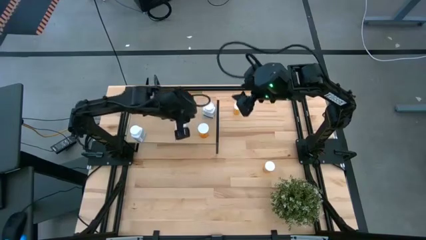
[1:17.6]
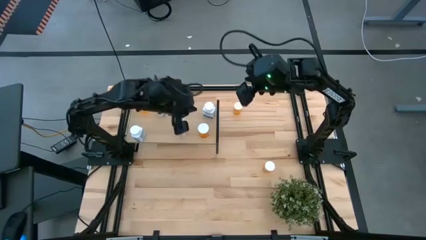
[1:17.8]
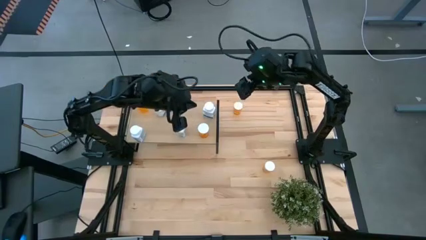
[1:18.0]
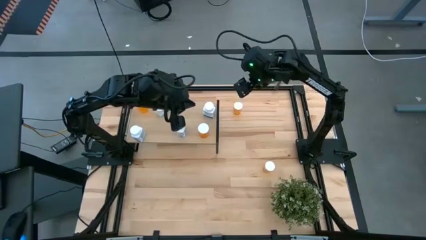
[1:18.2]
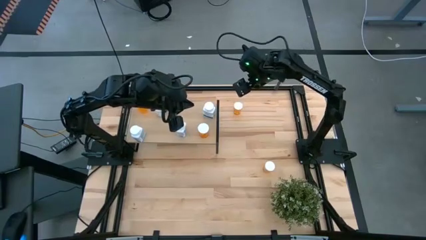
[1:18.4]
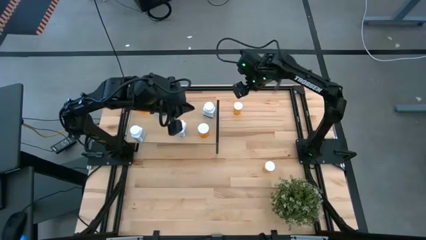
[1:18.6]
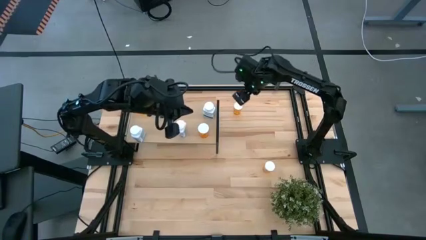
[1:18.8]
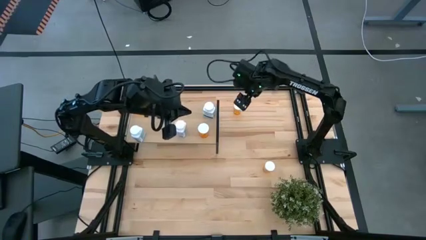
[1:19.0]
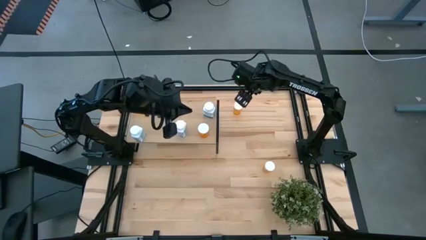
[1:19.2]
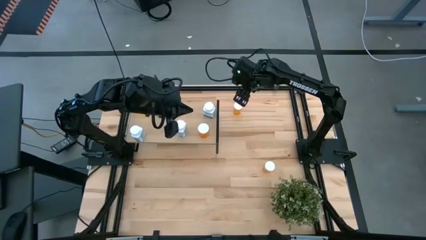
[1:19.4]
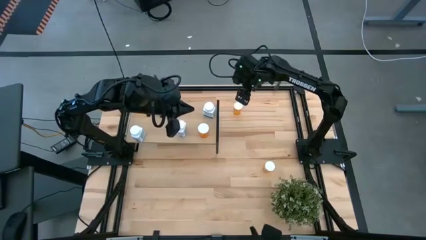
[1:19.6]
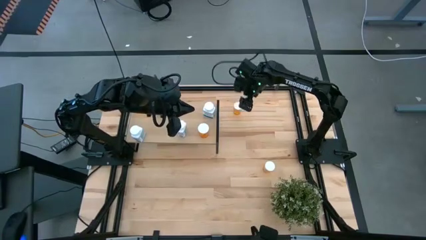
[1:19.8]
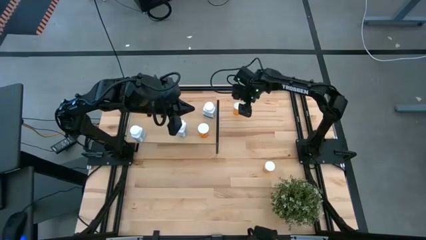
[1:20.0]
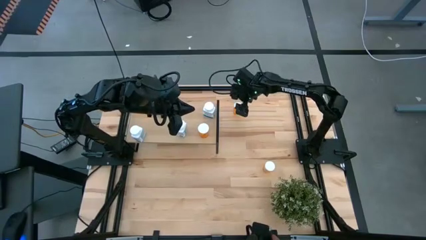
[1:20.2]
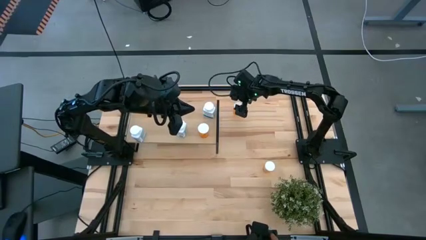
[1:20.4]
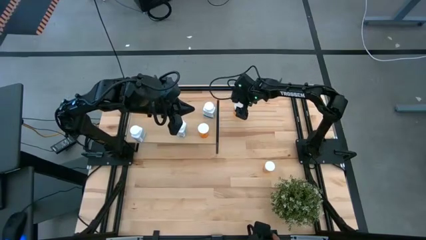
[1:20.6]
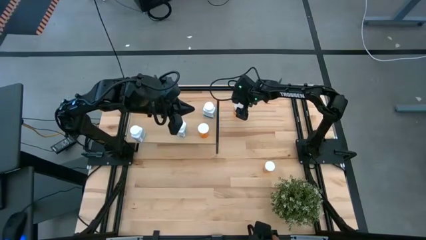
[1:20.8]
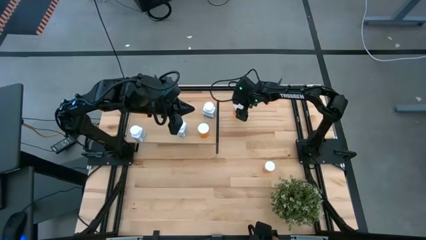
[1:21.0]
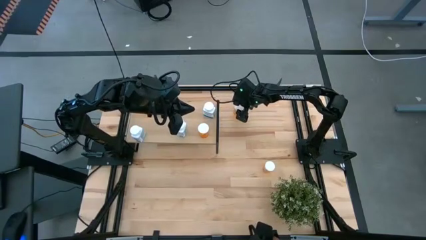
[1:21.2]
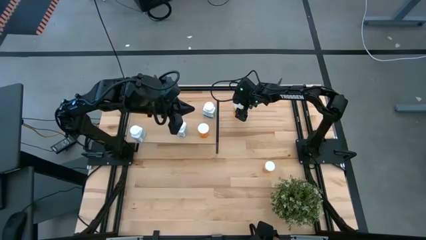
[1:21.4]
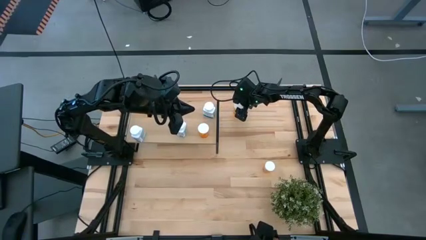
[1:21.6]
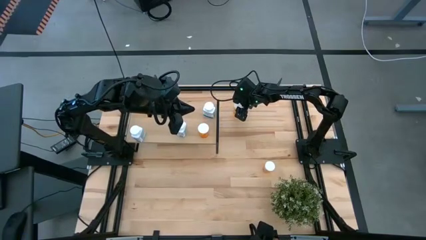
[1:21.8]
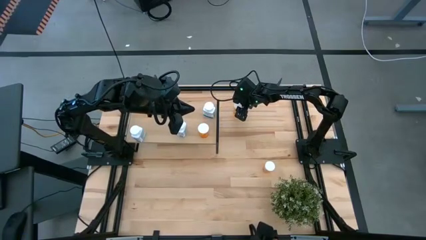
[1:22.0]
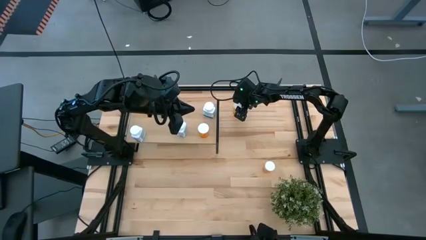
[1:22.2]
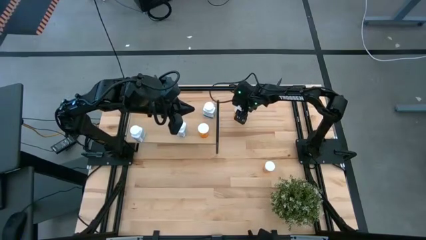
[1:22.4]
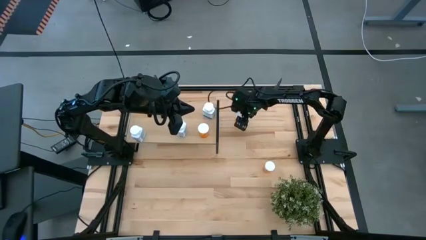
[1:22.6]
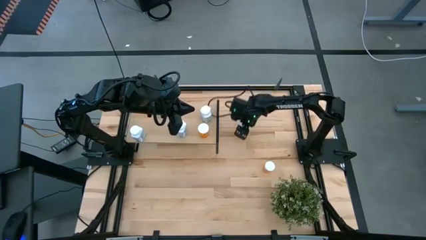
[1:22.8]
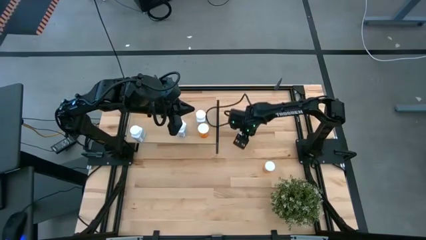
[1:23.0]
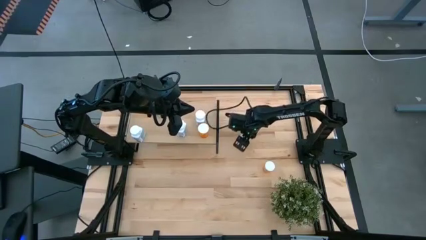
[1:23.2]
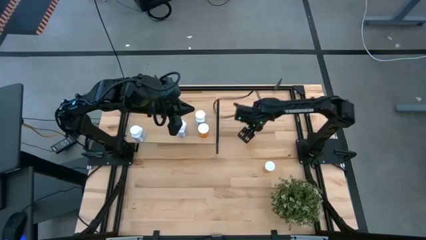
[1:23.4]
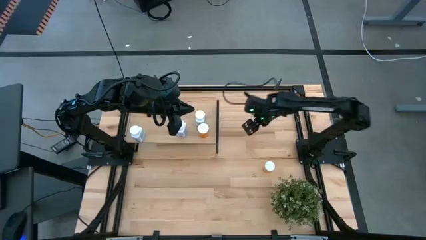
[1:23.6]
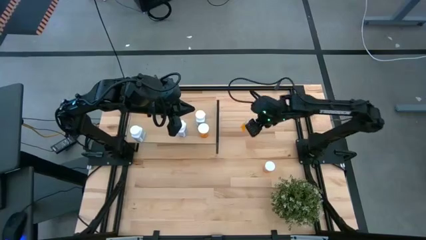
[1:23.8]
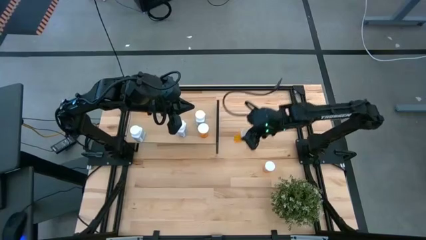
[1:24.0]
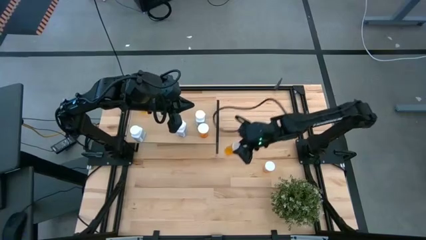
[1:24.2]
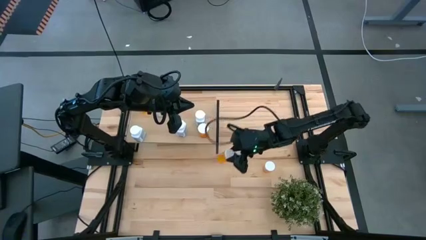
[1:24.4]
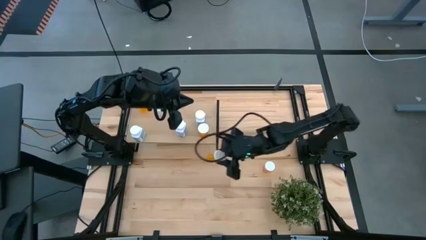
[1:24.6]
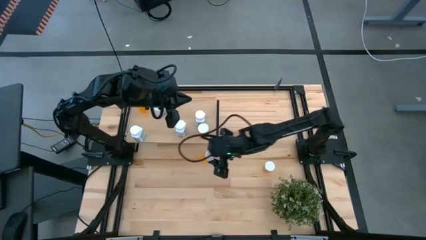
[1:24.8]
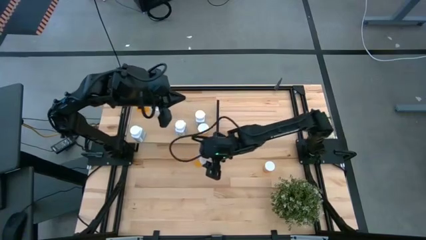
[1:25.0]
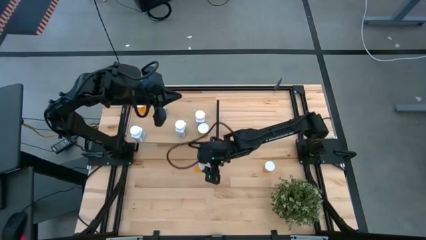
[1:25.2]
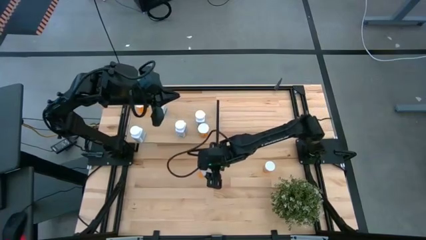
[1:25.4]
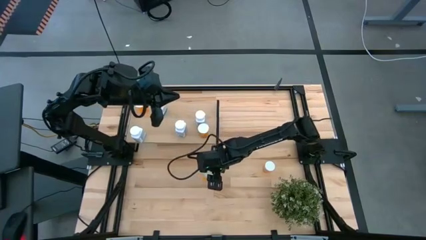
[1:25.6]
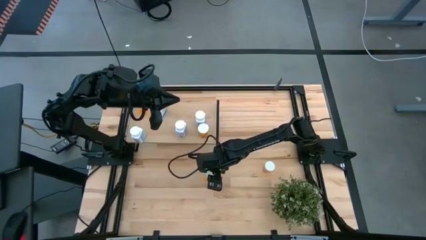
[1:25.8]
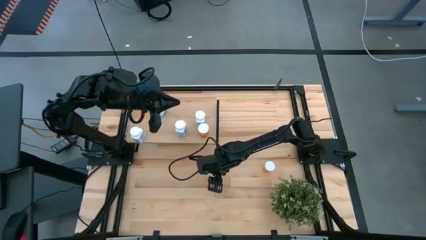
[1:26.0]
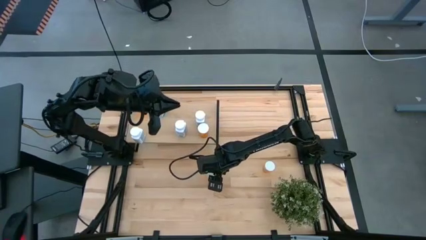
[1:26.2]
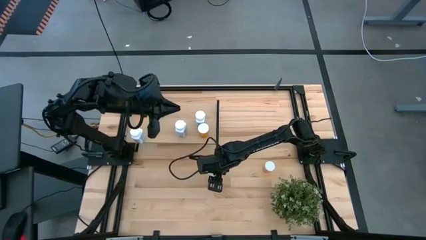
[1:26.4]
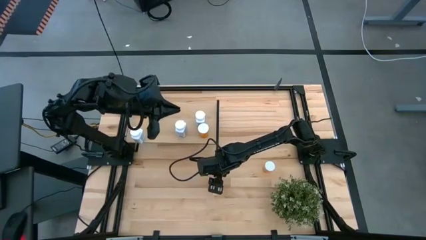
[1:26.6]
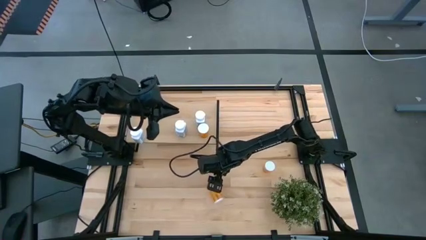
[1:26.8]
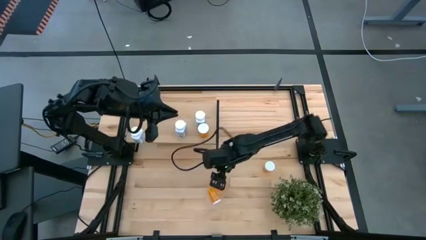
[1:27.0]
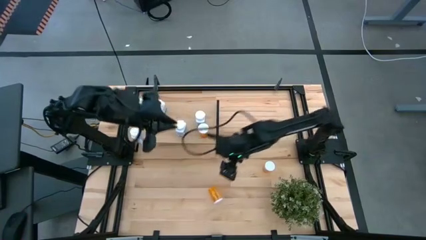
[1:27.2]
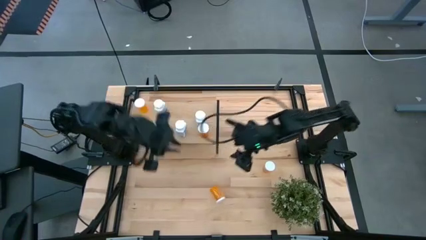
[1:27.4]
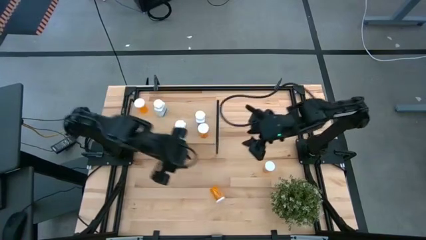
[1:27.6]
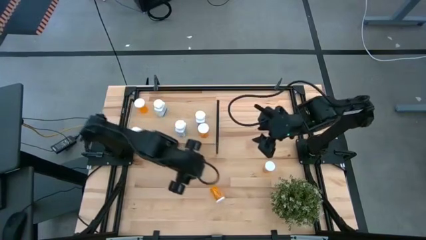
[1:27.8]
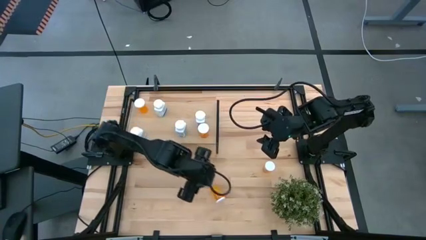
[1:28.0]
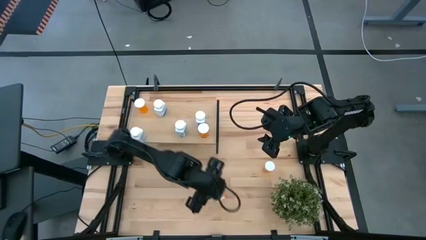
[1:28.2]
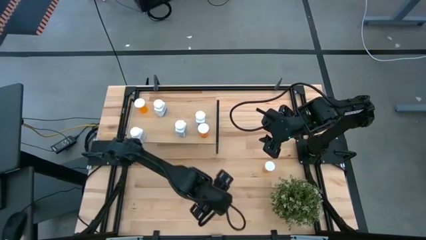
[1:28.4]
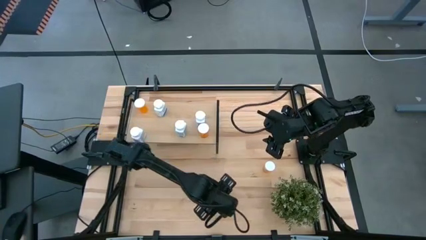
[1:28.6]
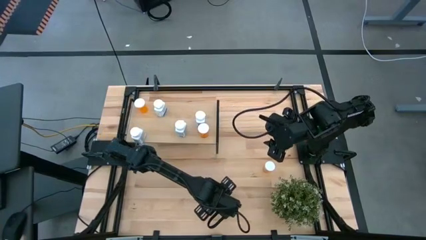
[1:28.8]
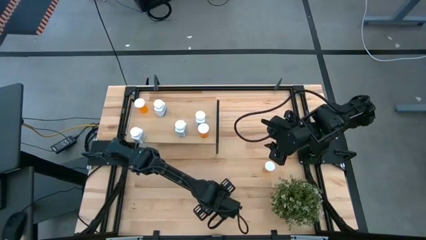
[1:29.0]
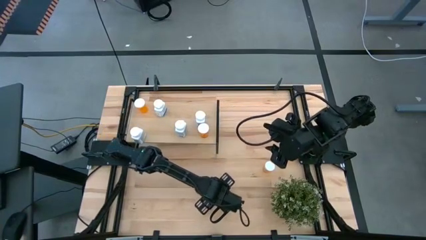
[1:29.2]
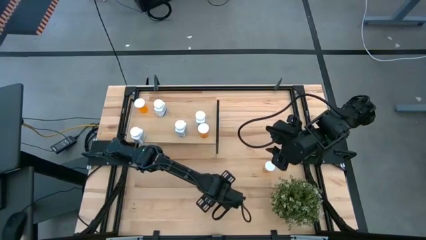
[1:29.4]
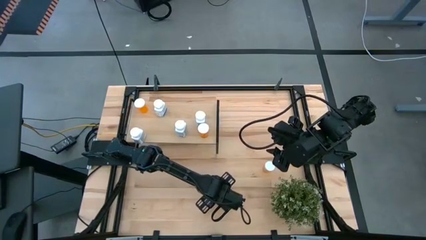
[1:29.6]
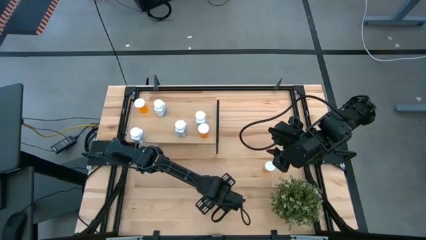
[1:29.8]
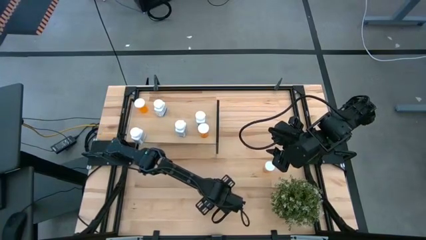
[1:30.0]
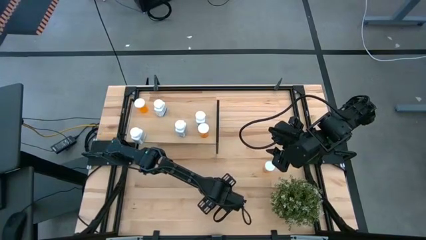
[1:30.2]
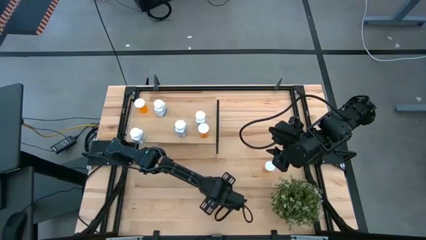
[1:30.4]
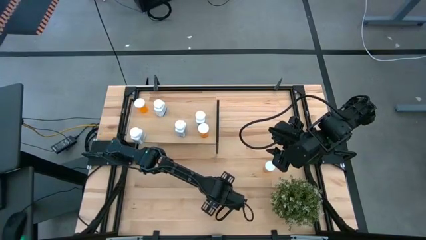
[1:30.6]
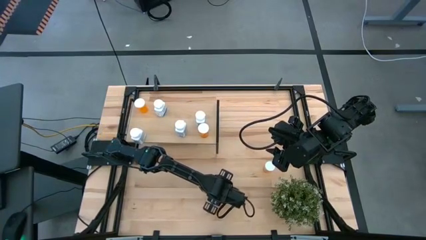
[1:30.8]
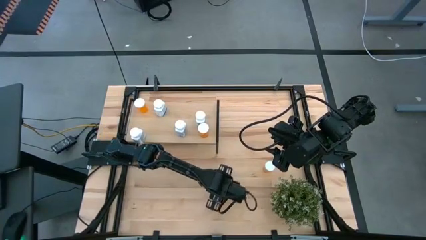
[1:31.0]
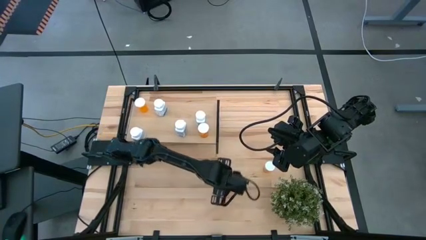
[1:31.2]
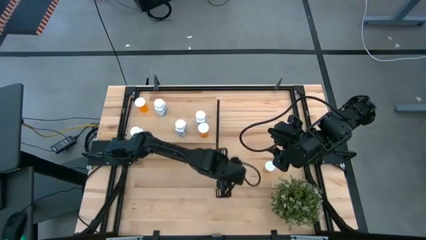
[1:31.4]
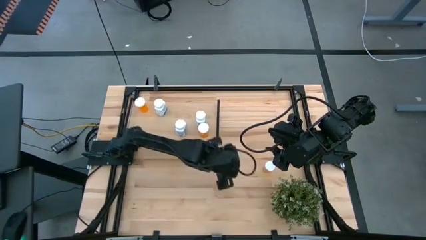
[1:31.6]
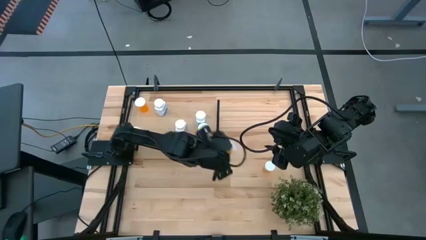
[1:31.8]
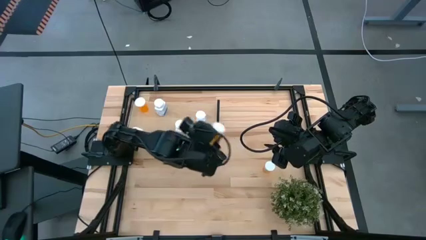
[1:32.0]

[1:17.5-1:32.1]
Task: Pick and place medicine bottles onto shelf by color
Put the orange pill bottle on the shelf

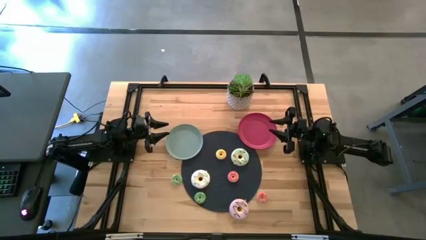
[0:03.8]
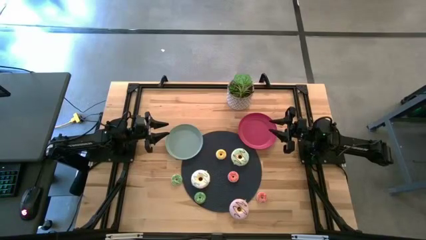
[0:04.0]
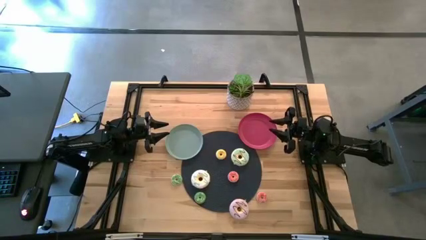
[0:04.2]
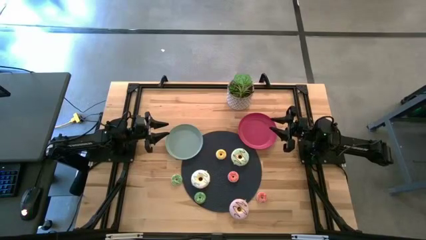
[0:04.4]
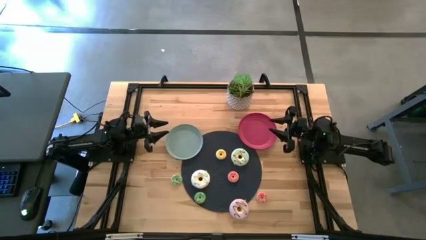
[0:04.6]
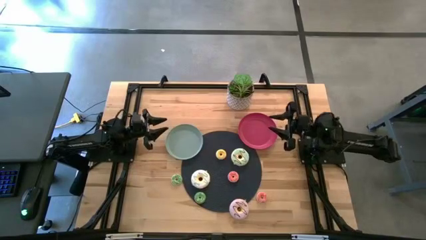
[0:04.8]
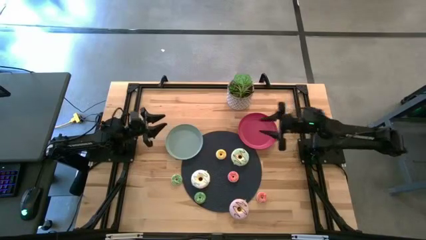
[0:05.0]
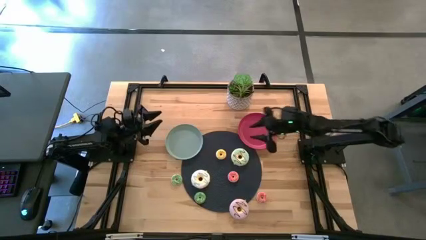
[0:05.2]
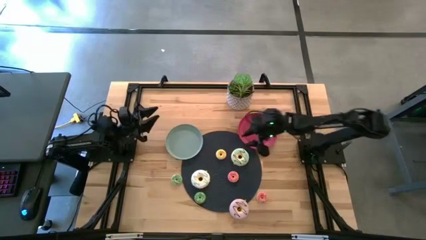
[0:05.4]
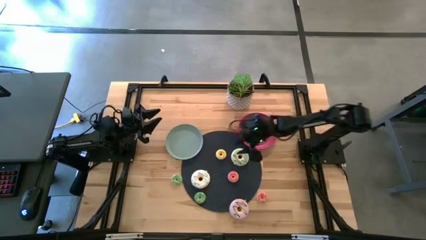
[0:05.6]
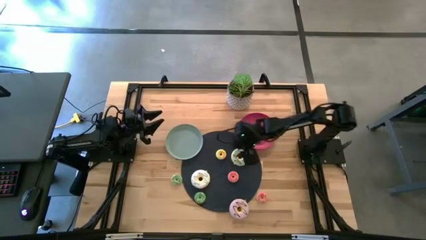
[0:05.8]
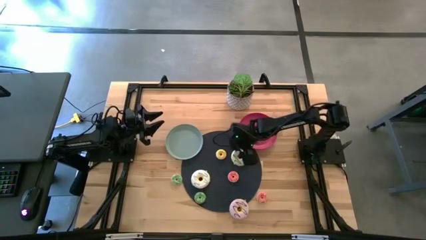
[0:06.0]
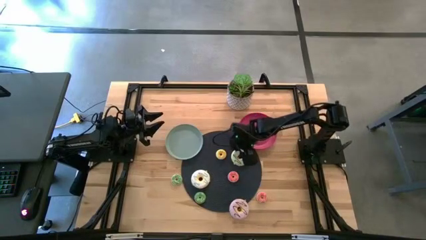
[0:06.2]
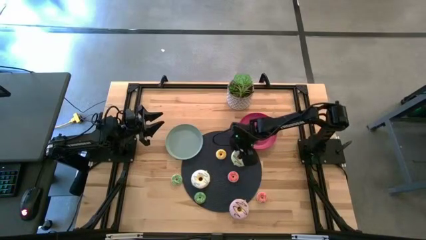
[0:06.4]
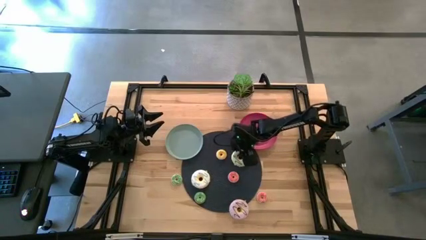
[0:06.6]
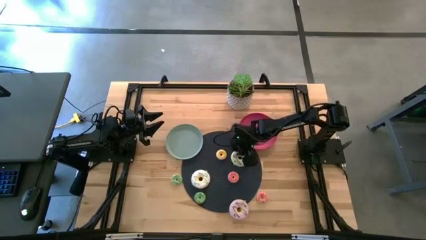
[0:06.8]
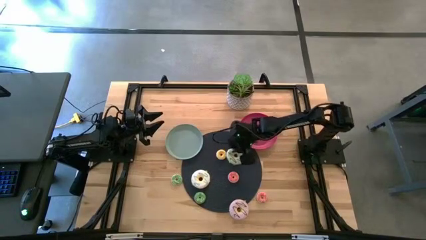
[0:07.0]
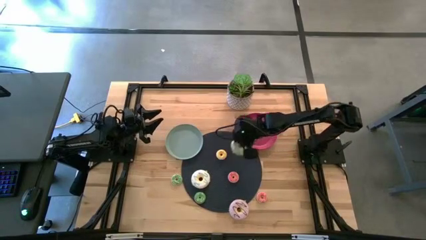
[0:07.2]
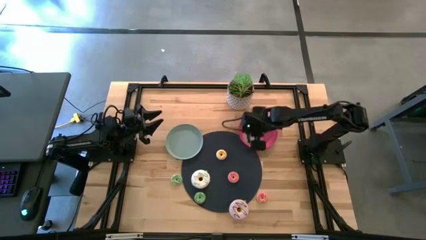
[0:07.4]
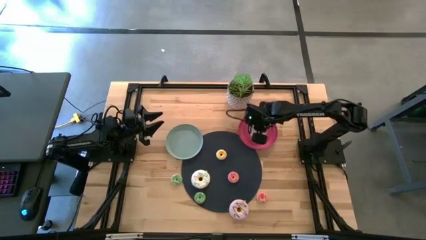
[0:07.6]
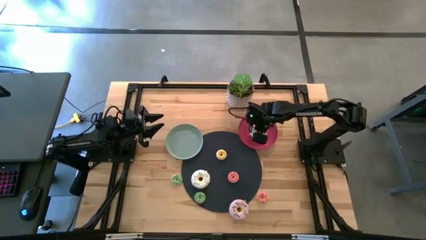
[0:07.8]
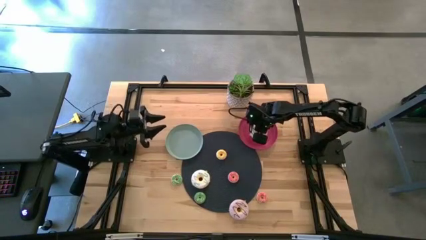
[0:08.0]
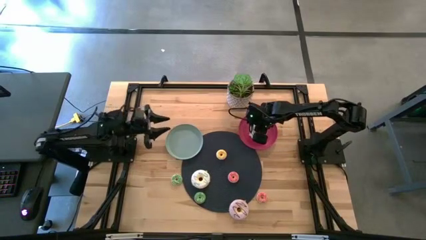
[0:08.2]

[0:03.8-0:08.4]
Task: Pick & Place donuts
Put the big blue doughnut on the red plate
